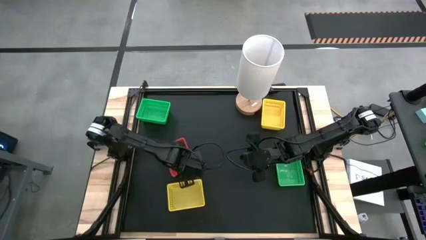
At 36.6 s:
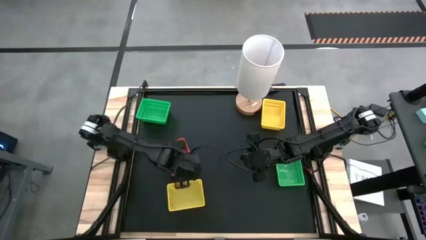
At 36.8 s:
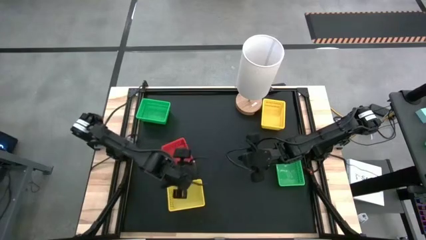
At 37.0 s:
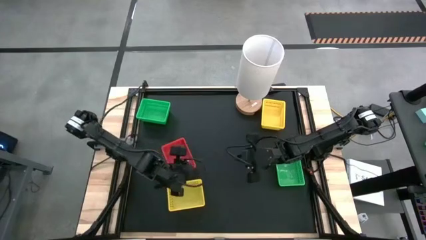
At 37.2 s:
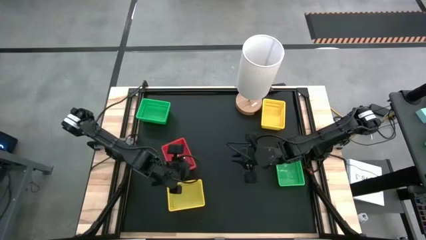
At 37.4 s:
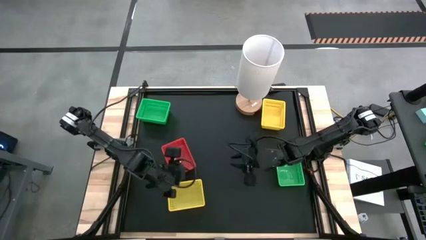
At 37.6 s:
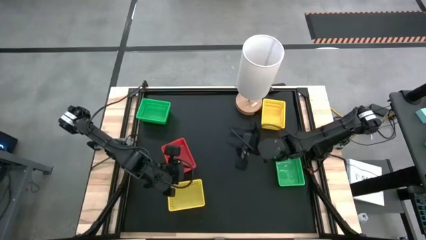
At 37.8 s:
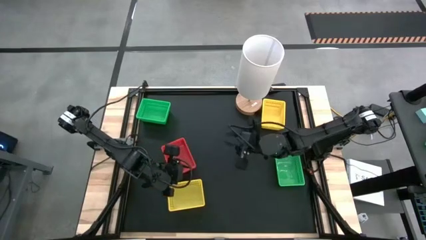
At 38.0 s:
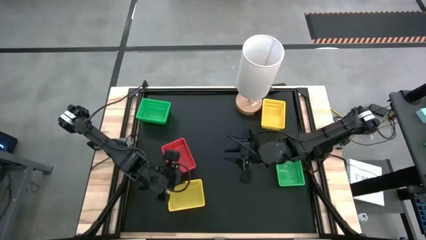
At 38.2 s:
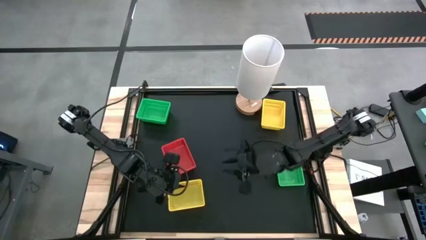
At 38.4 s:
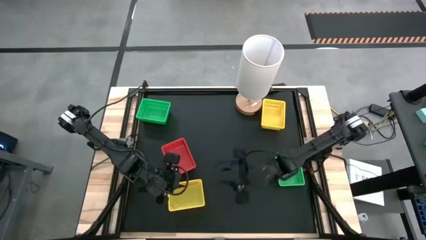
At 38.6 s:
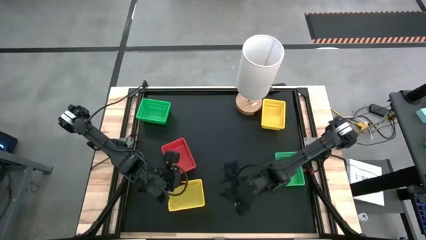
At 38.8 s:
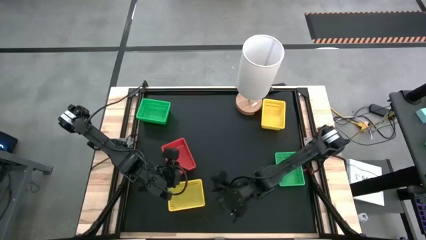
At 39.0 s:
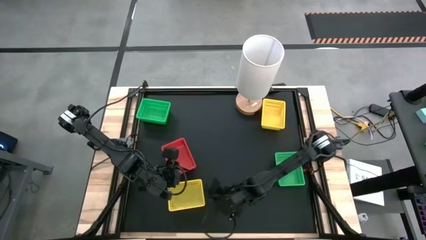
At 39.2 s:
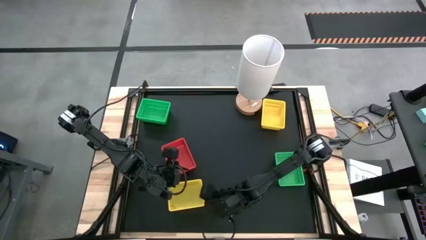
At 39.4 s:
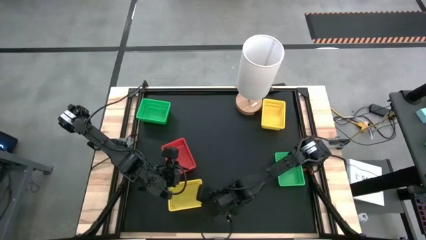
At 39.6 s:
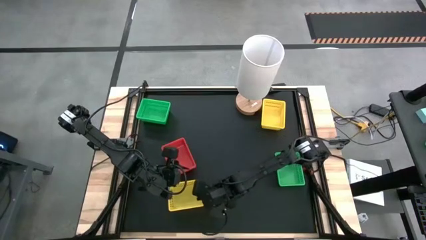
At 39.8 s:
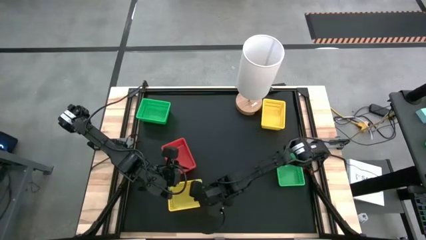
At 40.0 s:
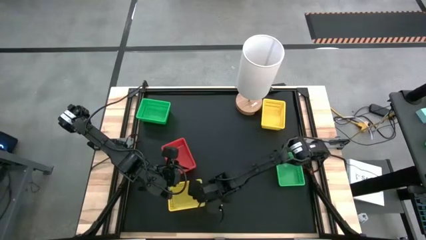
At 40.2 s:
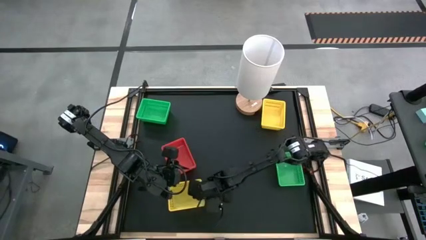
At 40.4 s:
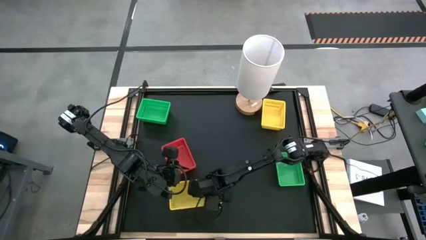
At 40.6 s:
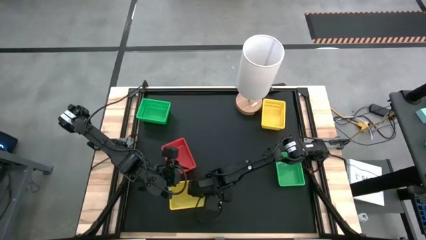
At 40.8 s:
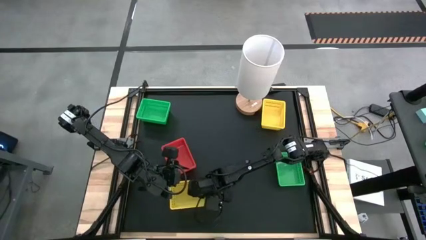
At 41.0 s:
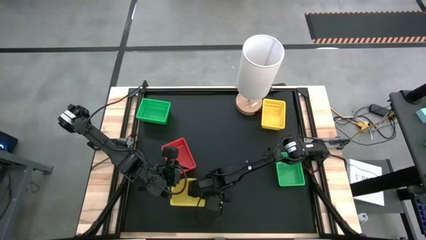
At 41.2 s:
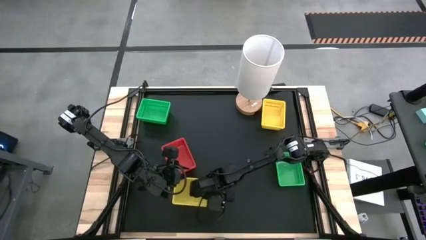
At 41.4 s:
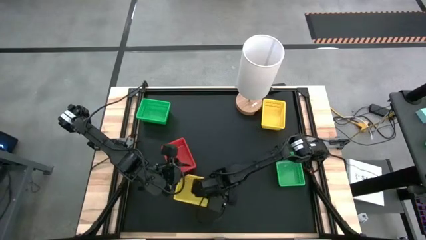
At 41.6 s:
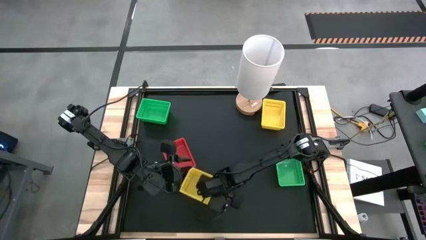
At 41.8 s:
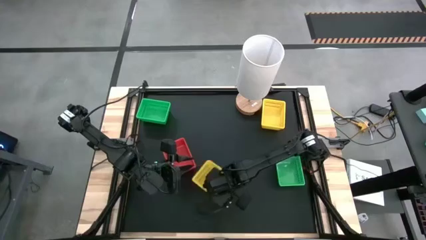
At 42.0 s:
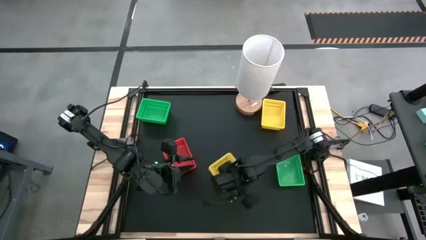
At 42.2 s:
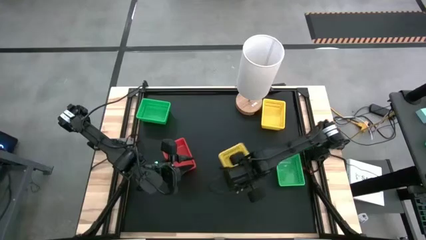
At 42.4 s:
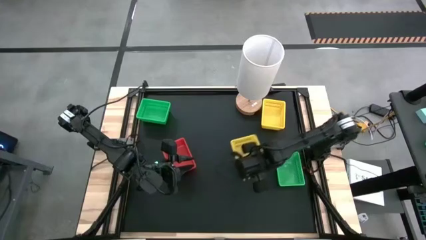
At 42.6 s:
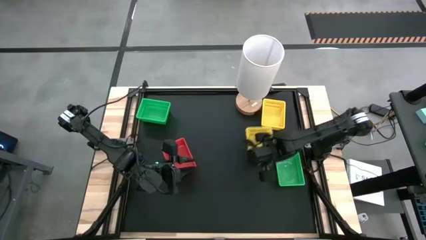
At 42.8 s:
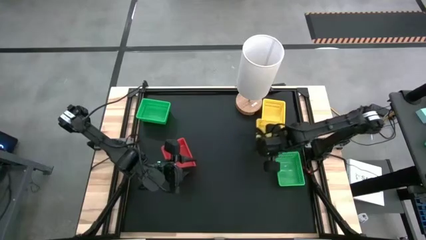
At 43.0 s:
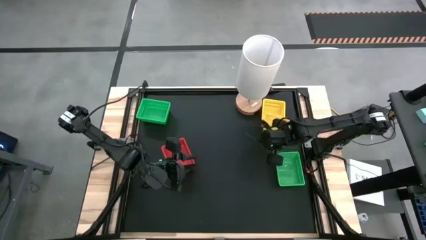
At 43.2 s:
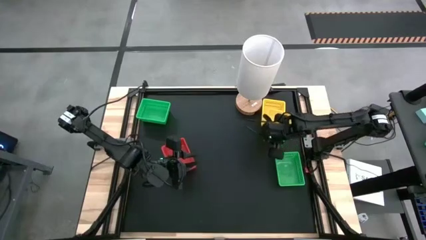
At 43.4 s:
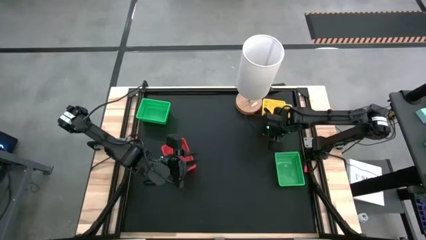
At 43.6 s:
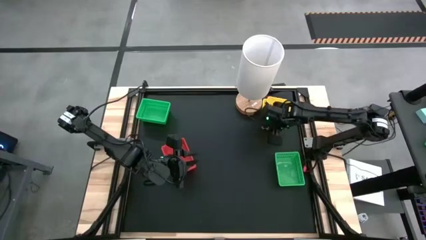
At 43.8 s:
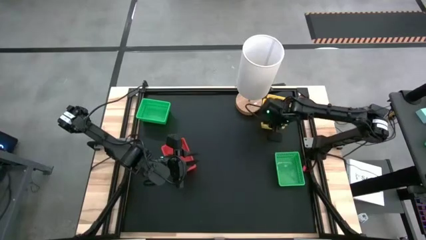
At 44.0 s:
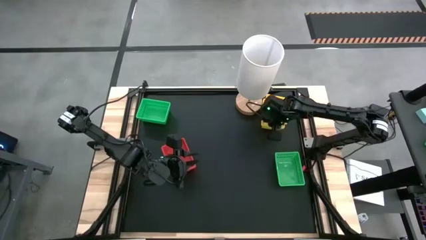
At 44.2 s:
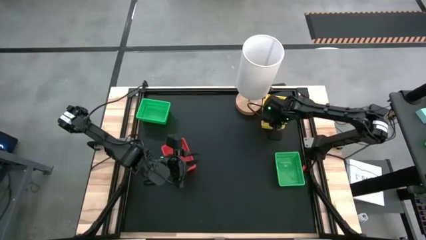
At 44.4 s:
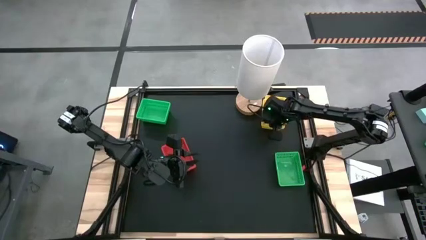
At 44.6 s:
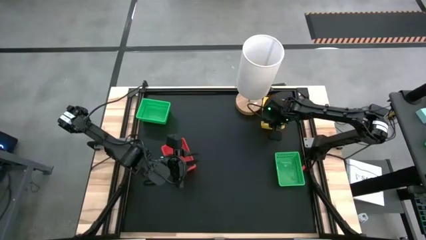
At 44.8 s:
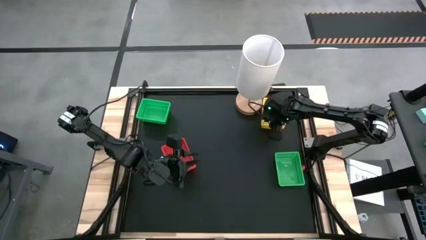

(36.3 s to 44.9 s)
Stack the bottom yellow bin on top of the top yellow bin

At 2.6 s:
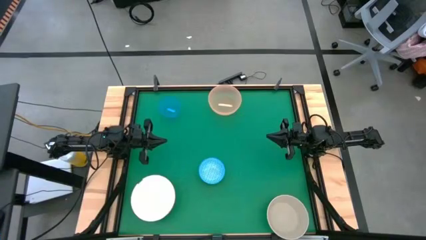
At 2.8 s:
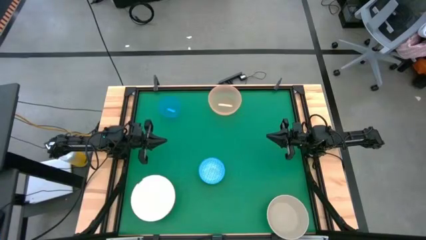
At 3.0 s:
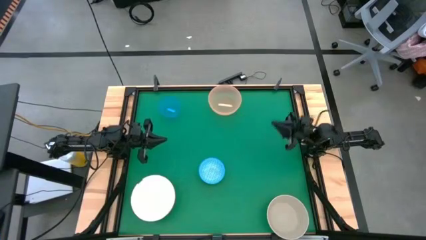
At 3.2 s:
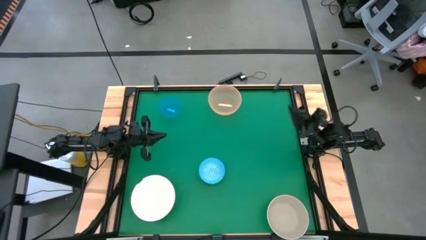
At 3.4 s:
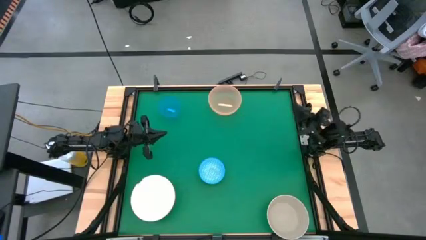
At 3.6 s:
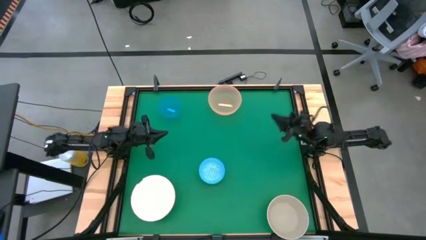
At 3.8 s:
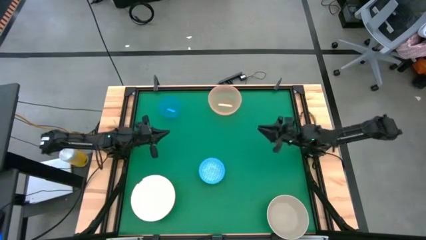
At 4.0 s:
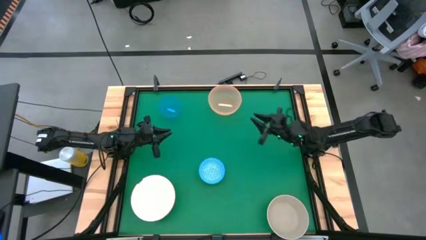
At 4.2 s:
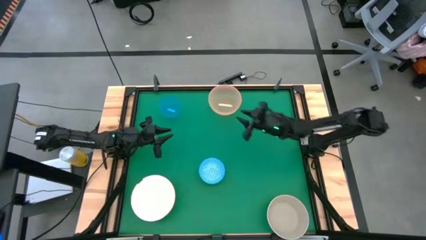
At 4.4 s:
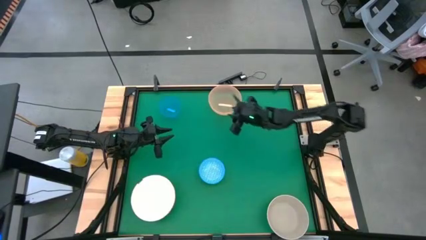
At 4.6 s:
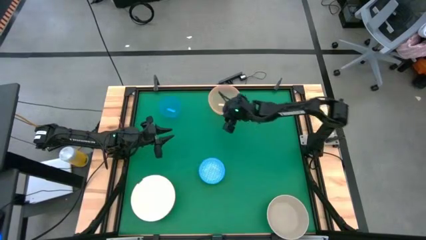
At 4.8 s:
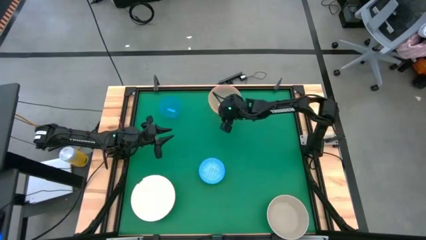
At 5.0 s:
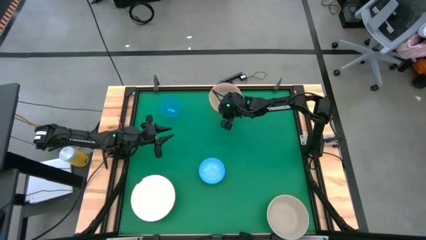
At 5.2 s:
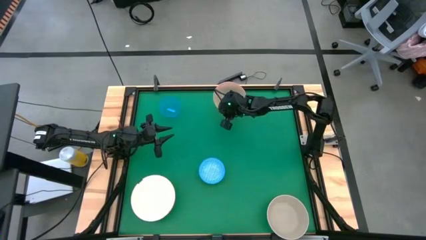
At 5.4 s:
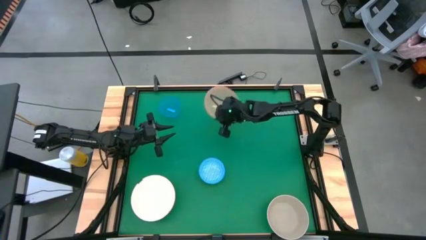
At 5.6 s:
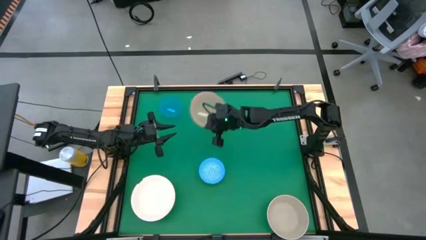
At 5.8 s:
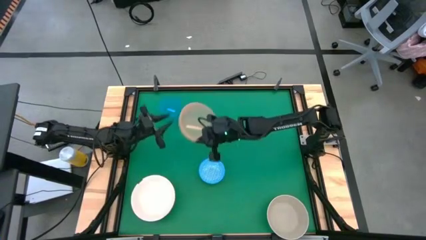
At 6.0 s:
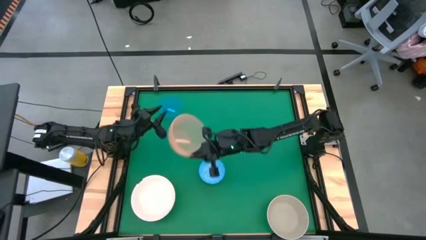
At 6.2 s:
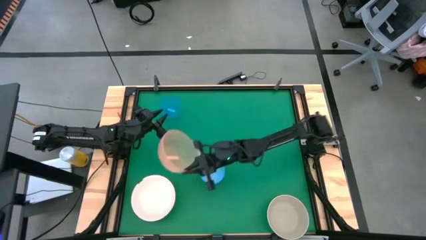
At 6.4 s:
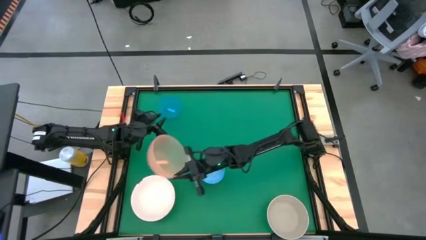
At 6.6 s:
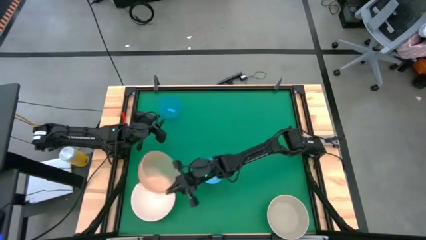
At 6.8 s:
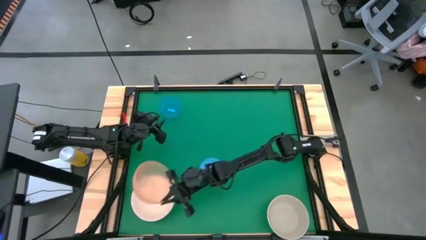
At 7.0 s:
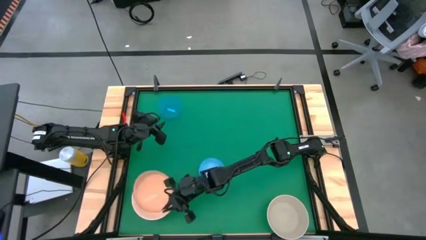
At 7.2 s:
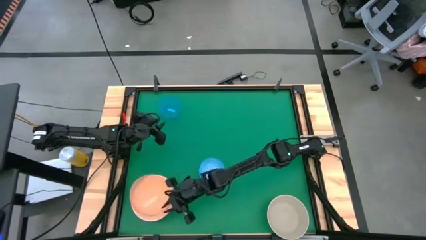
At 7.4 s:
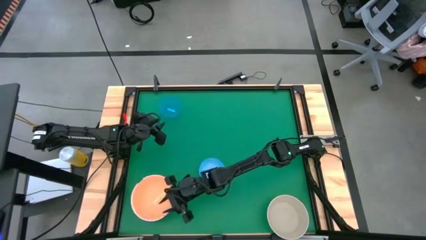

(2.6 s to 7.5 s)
Stack the orange bowl on top of the white bowl
